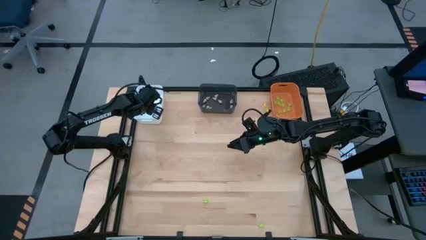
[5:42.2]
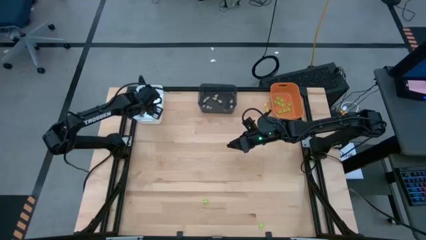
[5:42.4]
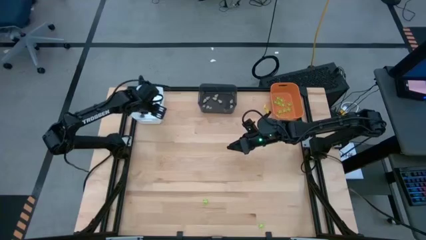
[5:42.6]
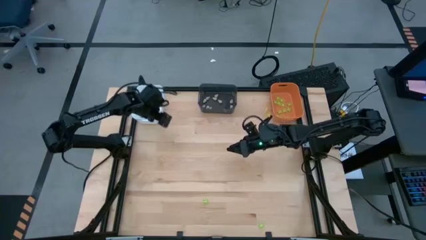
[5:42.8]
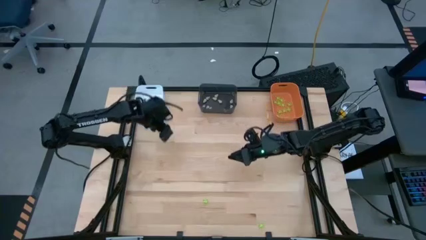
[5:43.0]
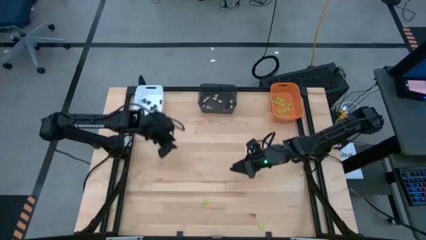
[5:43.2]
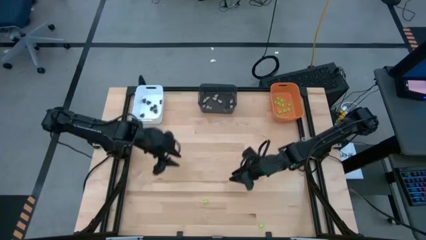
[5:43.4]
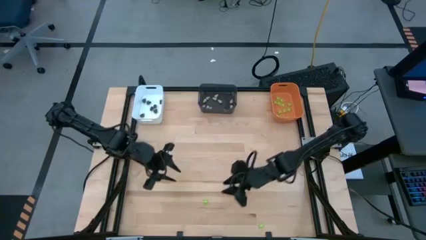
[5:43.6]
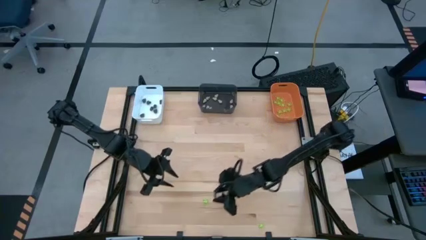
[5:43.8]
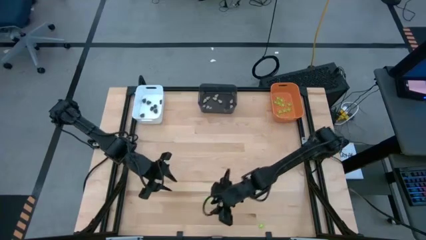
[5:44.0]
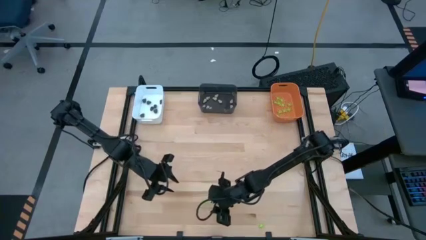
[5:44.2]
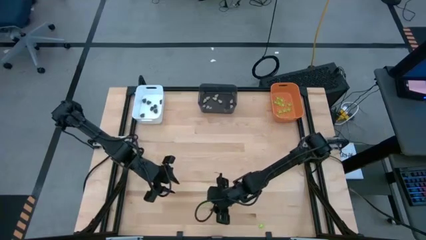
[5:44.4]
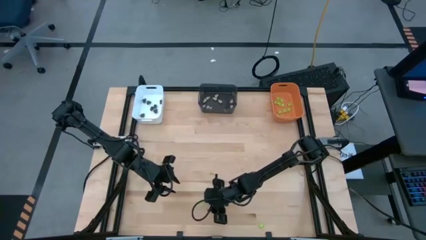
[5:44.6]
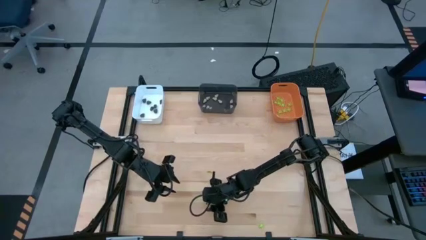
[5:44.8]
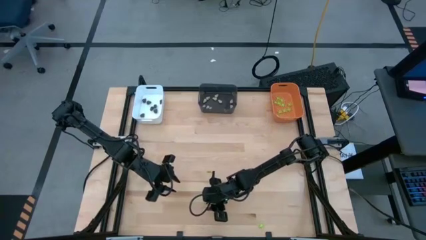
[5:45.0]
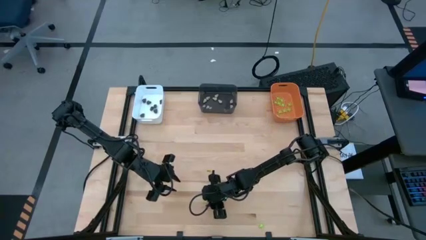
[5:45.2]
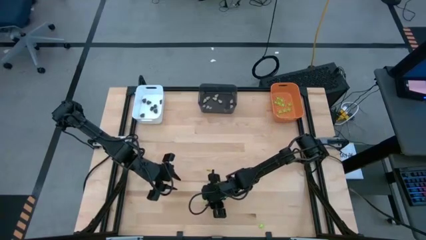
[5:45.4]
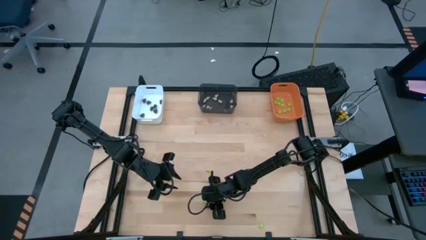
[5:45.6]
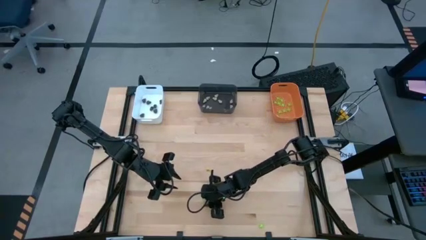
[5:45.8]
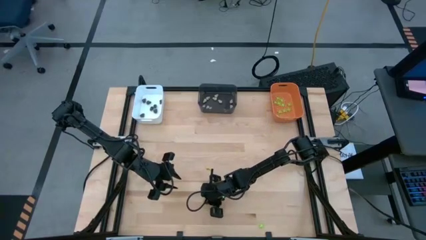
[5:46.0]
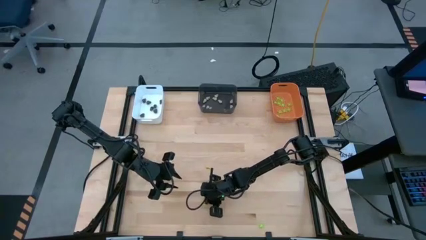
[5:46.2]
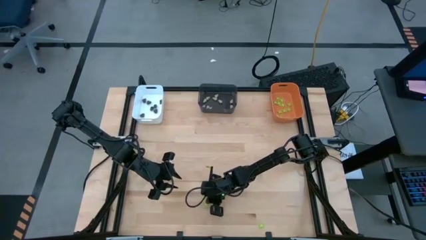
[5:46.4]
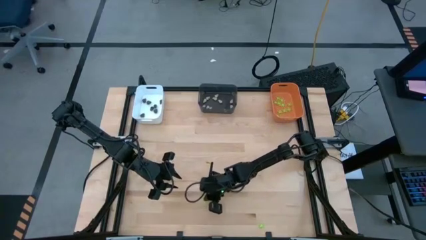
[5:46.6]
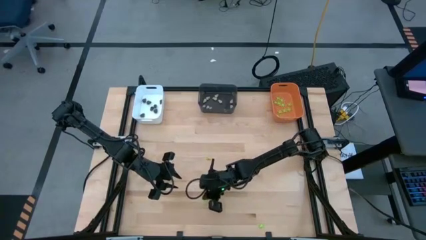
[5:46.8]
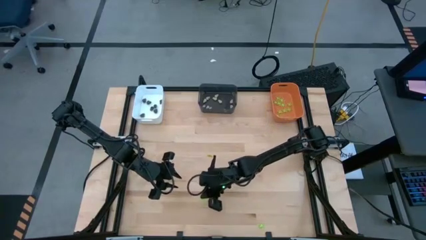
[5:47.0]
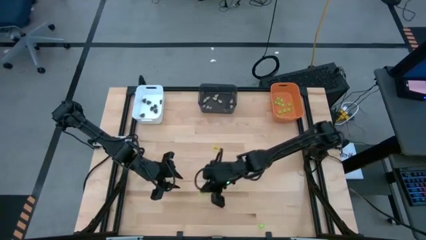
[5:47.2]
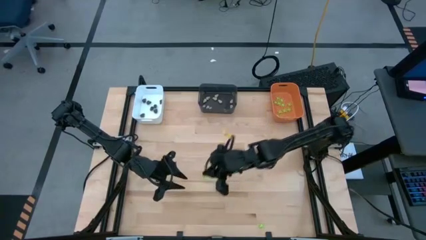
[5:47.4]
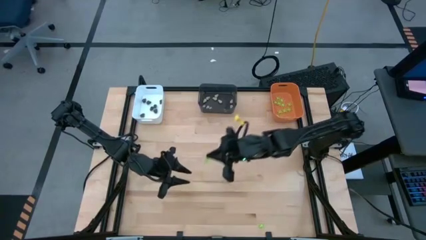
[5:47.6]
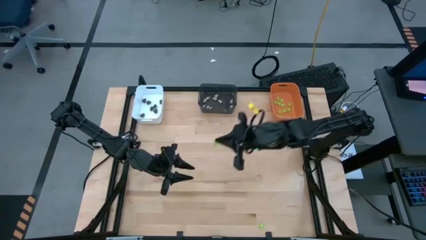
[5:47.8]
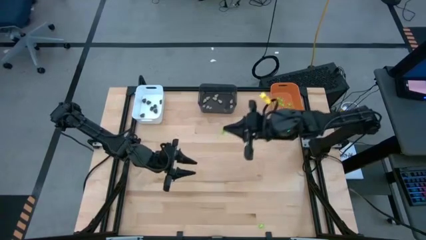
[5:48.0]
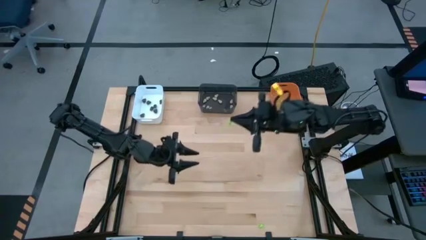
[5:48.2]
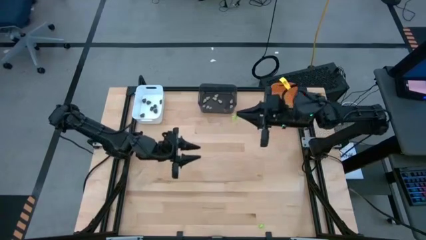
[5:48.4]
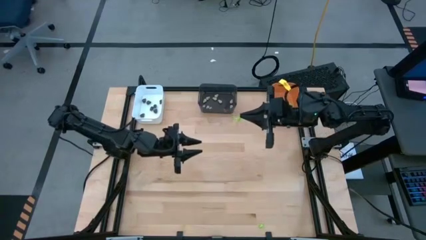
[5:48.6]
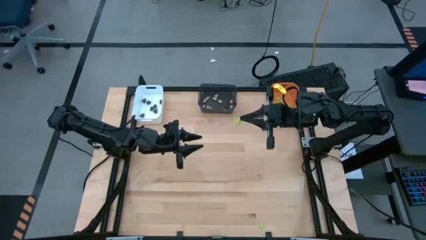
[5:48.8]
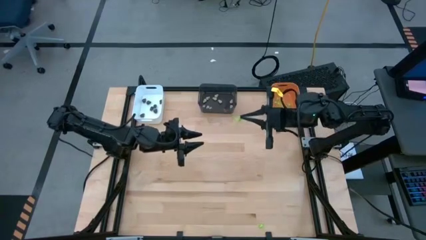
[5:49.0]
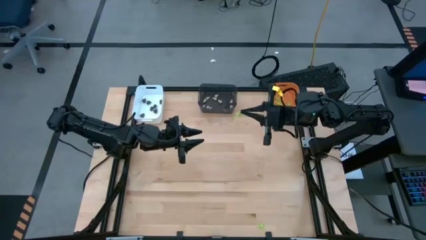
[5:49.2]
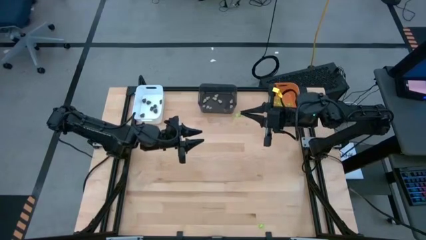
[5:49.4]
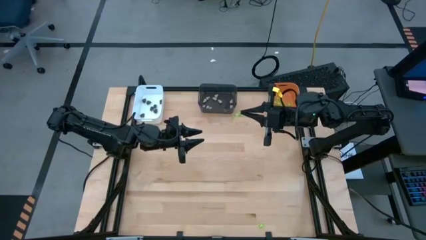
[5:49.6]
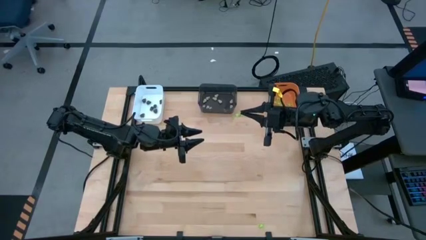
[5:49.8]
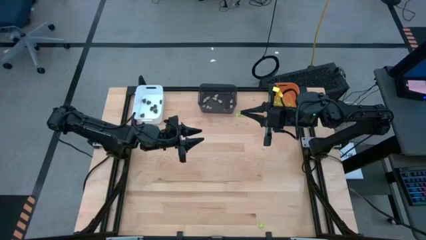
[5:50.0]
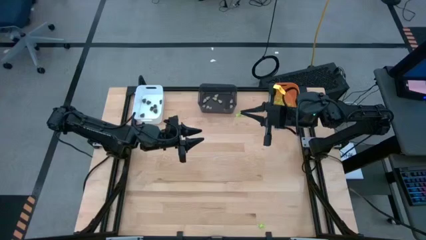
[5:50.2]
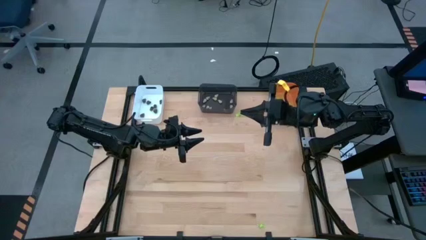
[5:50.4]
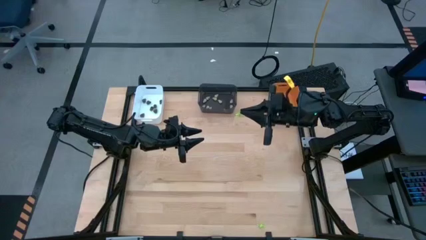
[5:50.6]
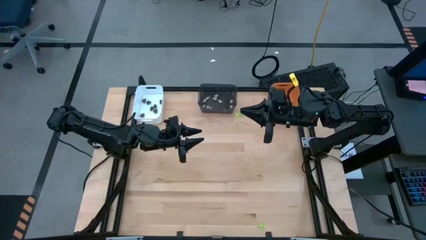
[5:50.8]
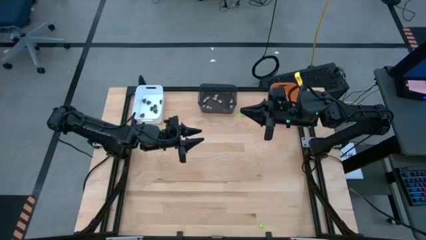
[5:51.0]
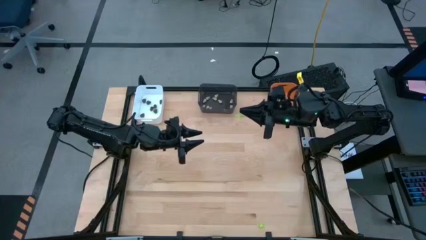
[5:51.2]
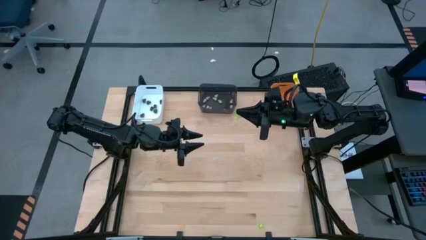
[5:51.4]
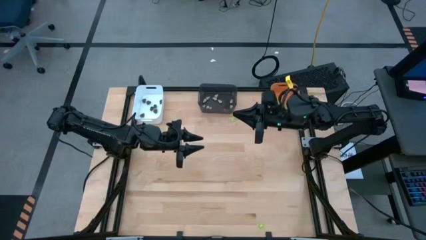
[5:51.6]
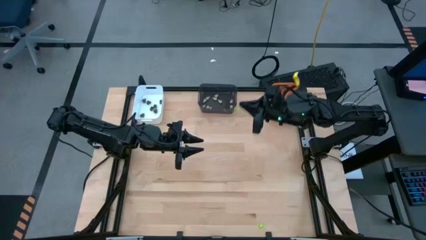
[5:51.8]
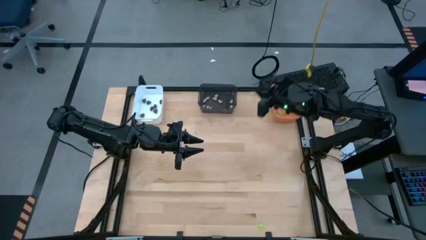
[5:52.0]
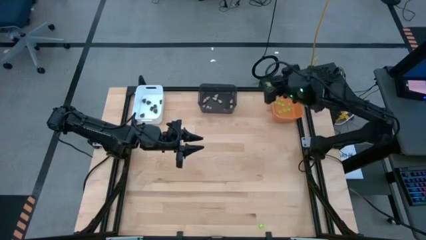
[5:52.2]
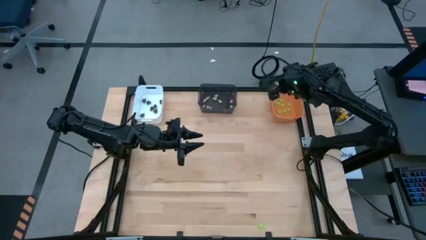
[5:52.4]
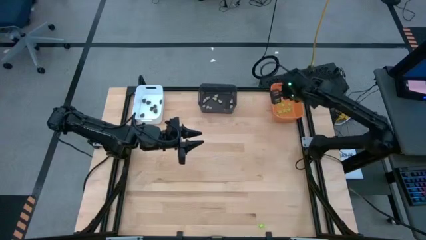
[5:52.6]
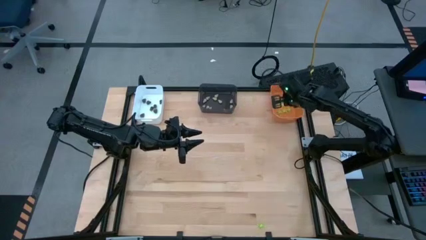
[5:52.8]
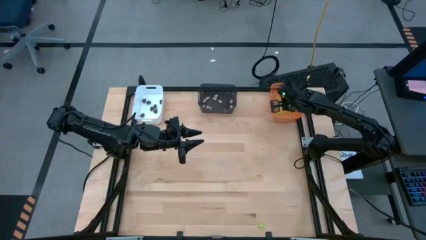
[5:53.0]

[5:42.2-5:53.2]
Task: Sort Halloween decoration
Put the green toy spider into the orange bin

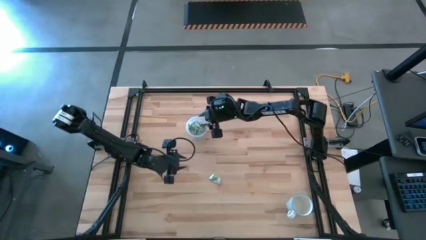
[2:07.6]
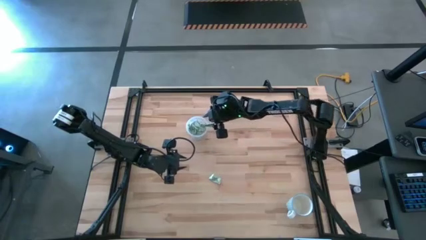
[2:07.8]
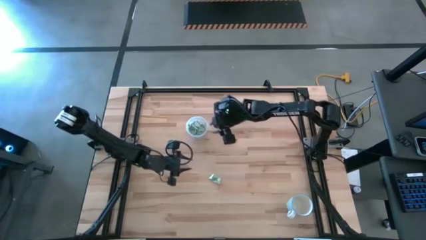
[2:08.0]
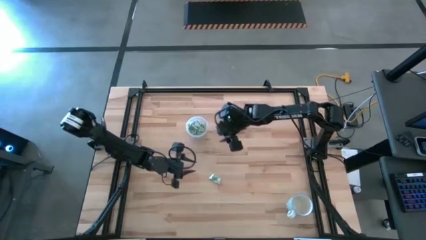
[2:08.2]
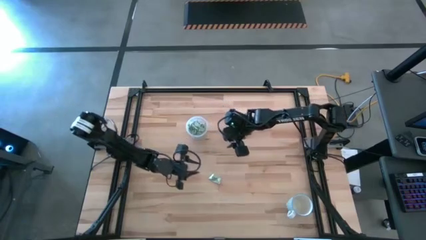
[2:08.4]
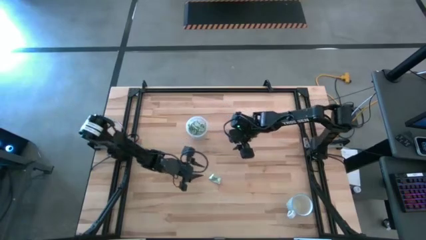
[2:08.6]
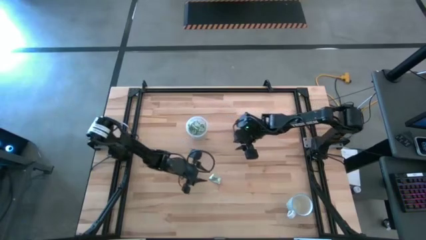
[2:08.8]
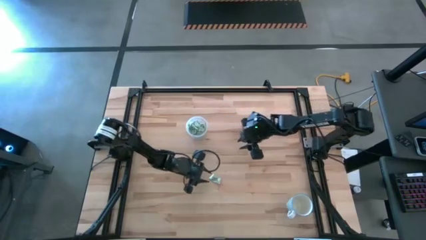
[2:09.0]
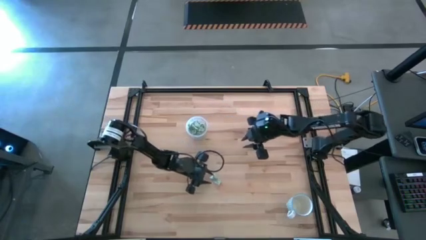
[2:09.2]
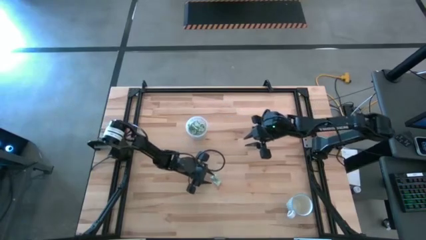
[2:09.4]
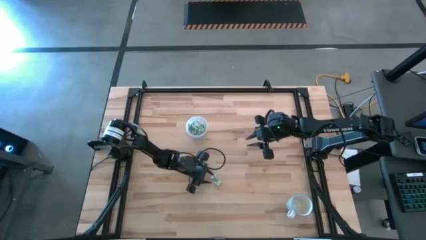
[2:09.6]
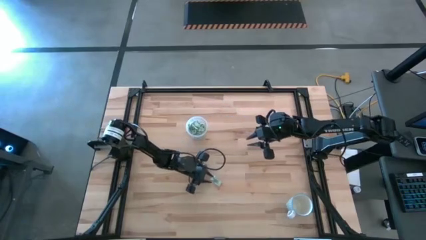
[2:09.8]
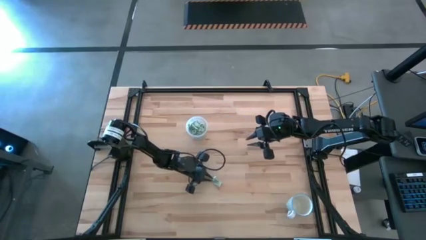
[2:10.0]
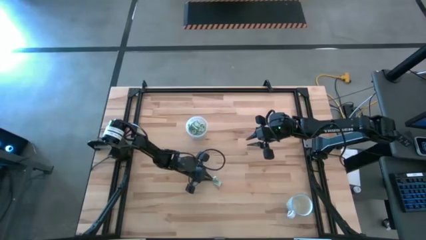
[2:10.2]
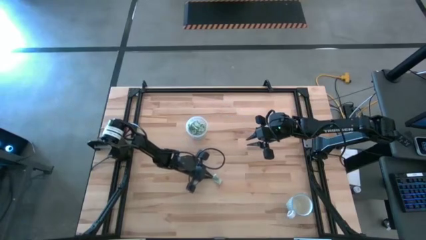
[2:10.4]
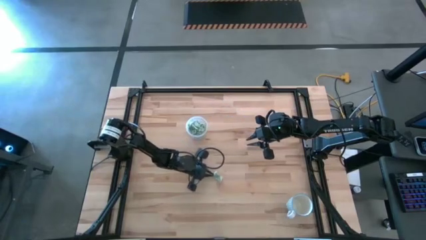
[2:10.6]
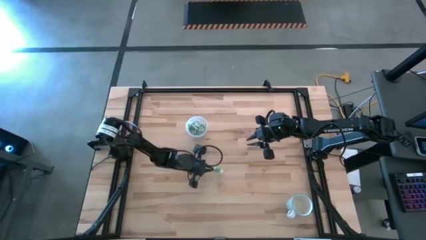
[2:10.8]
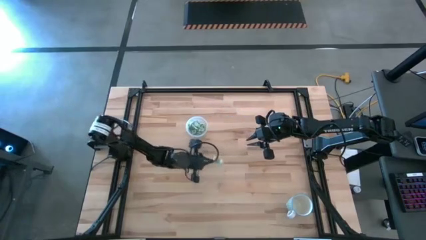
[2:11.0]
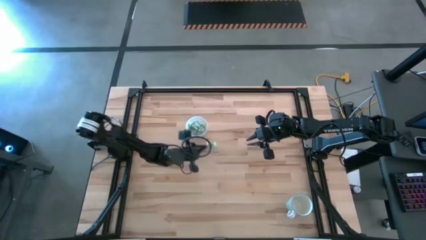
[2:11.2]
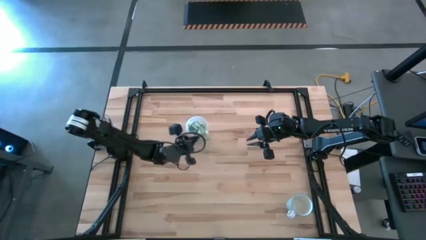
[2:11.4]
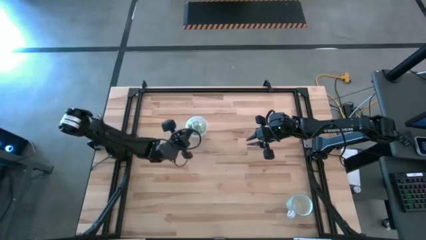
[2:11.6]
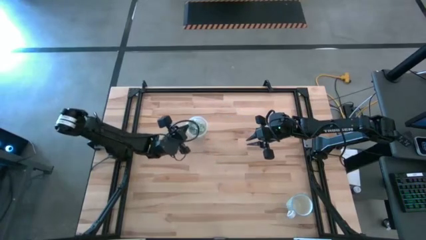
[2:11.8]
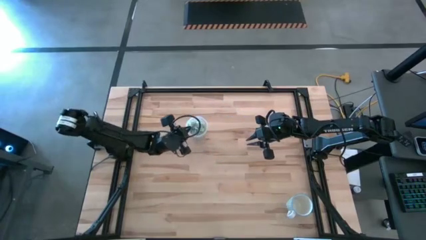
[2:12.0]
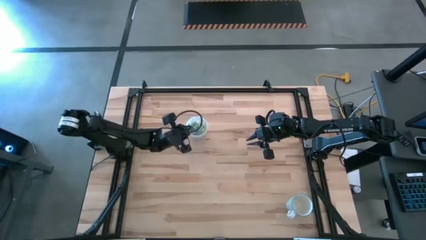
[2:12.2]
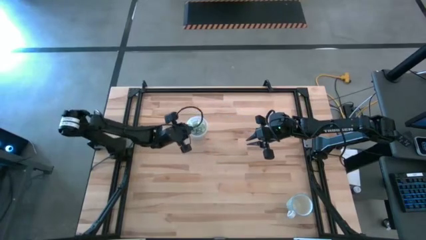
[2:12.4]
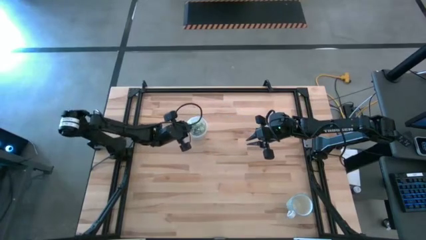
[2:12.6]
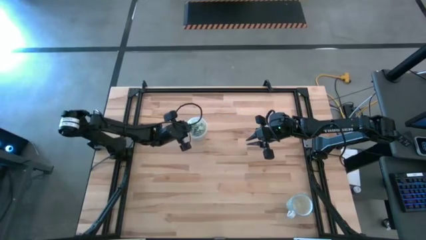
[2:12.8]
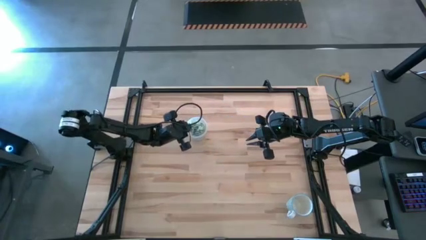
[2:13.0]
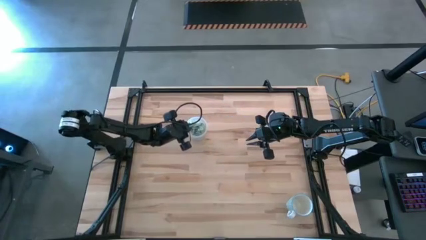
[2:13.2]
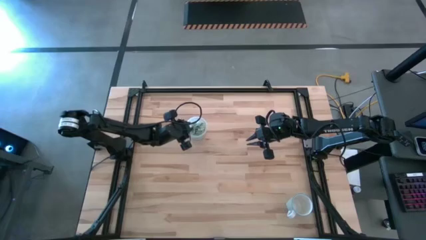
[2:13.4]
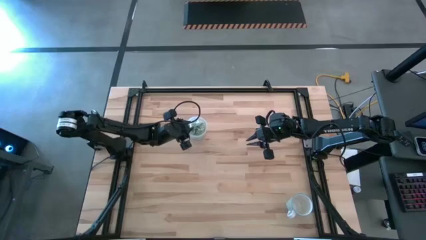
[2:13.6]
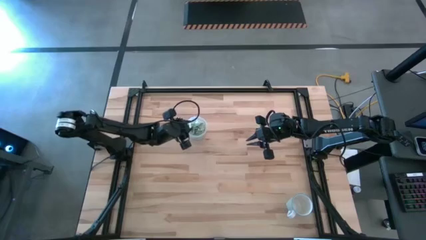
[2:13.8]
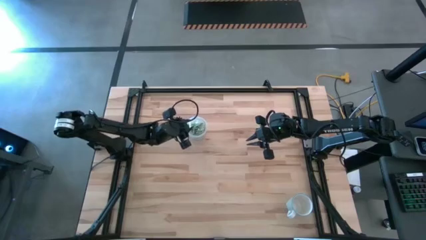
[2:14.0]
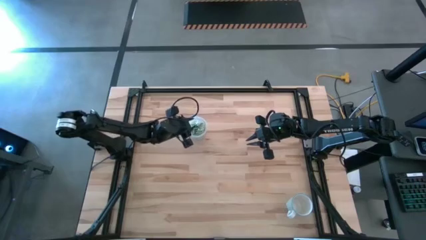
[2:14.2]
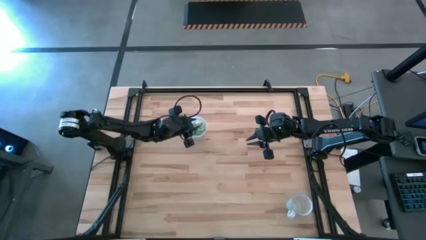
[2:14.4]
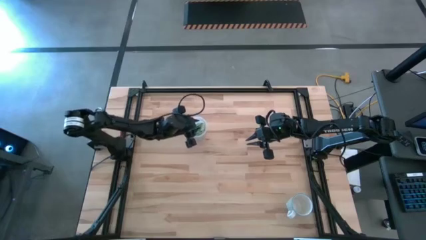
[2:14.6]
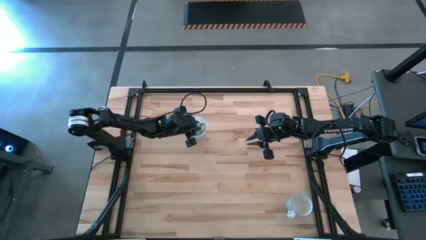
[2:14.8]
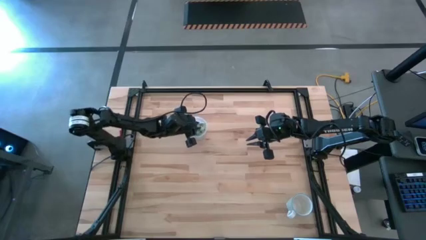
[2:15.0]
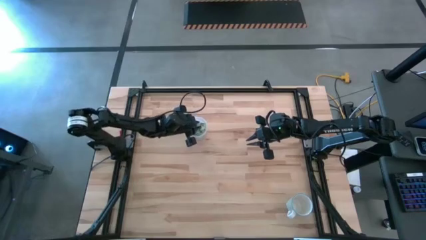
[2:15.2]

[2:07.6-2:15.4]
Task: Pick and place Stevia / Truvia into bins
Put the stevia packet into the transparent container
